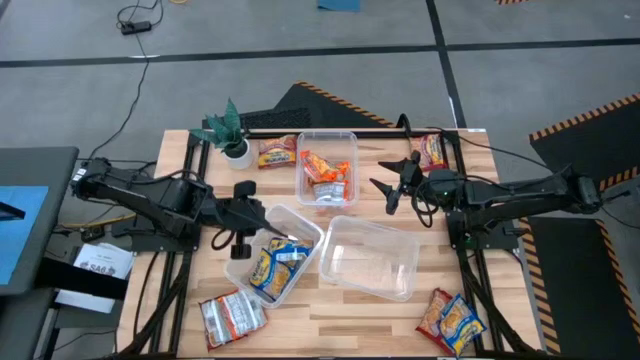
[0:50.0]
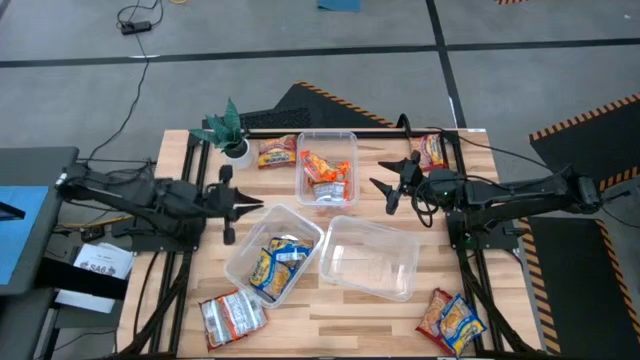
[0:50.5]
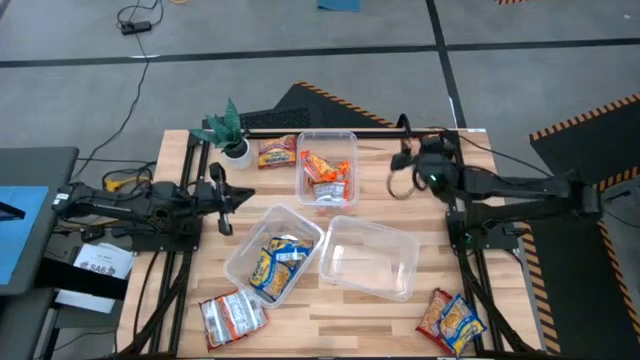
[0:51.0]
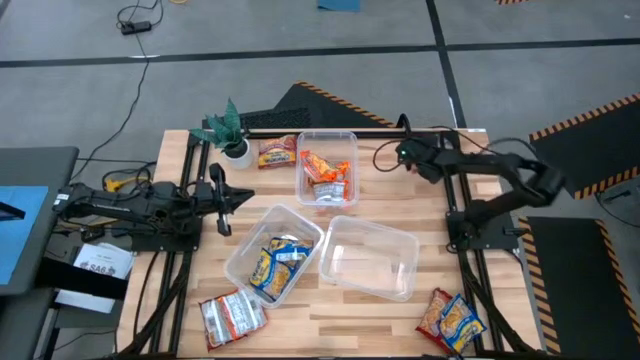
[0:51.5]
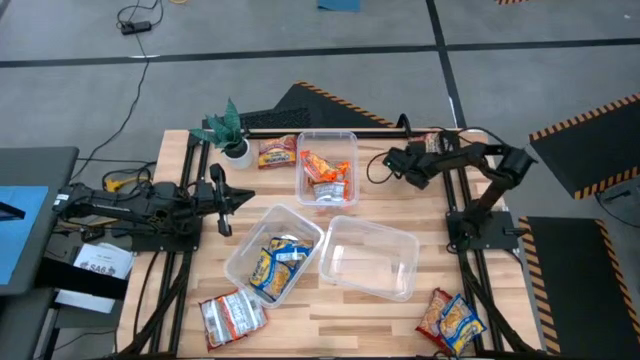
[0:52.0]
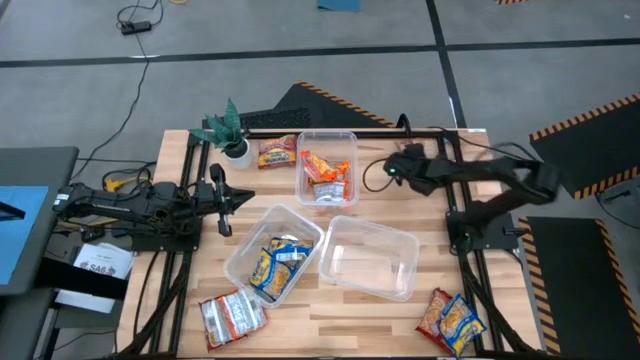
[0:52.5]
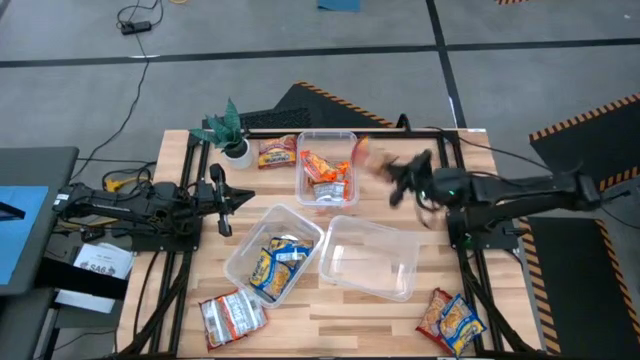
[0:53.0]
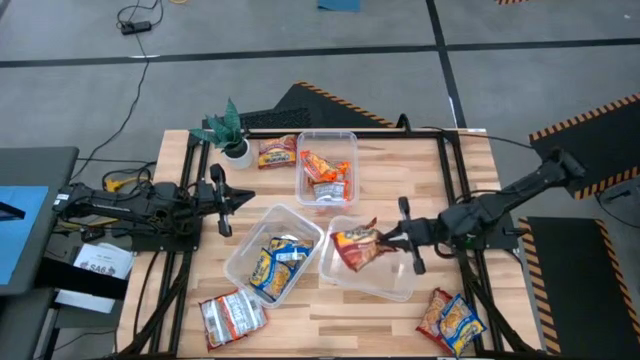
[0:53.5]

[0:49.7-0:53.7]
Task: Sort Maruchan noodles
Put the red noodle pack into the bottom right transparent bin

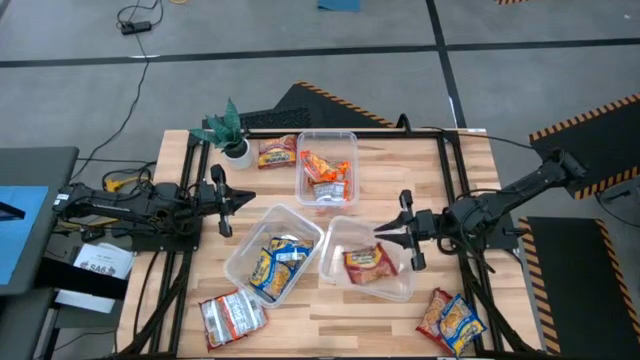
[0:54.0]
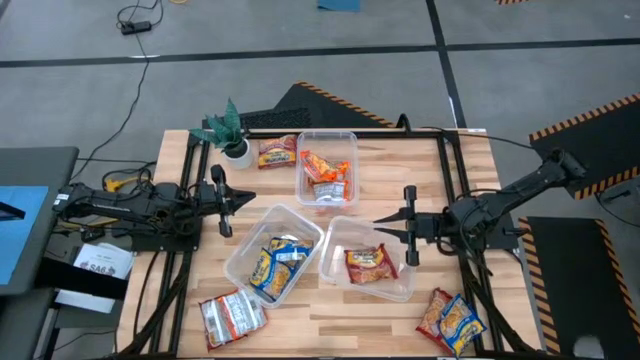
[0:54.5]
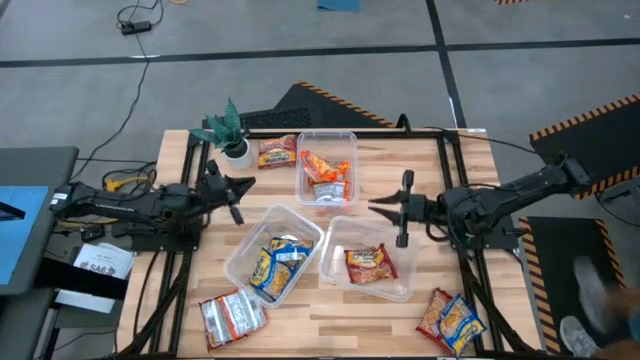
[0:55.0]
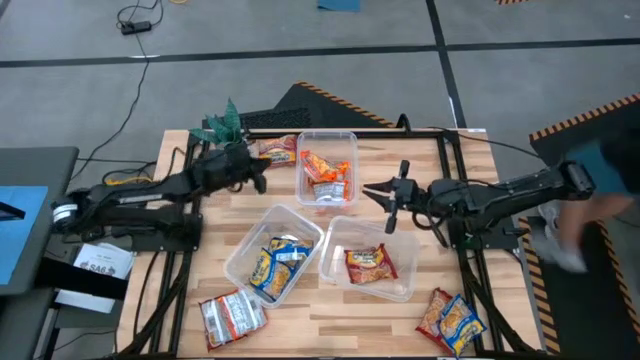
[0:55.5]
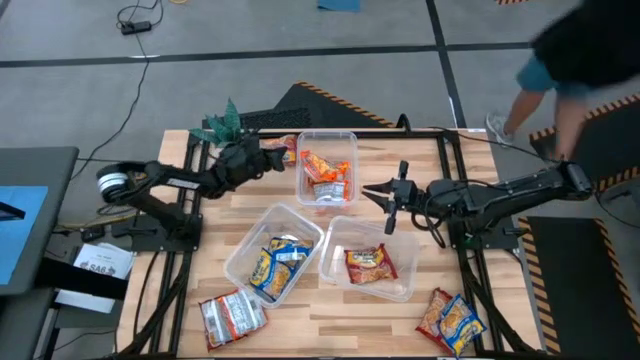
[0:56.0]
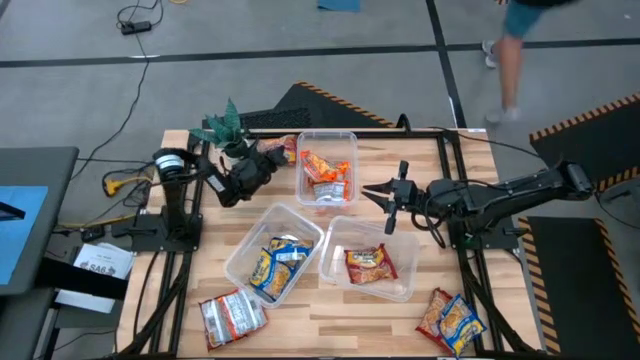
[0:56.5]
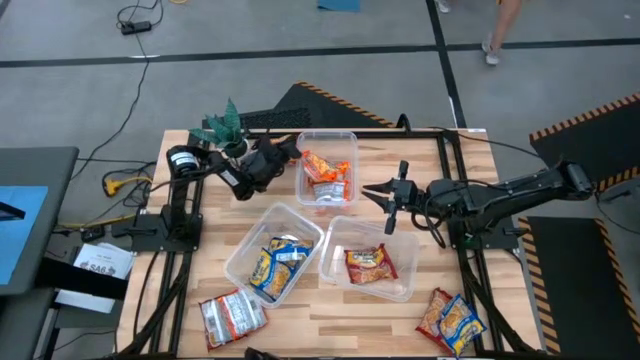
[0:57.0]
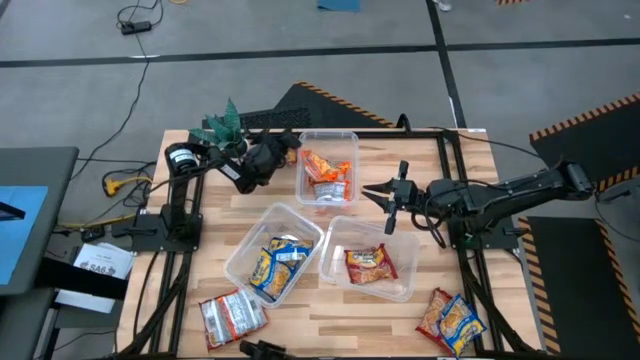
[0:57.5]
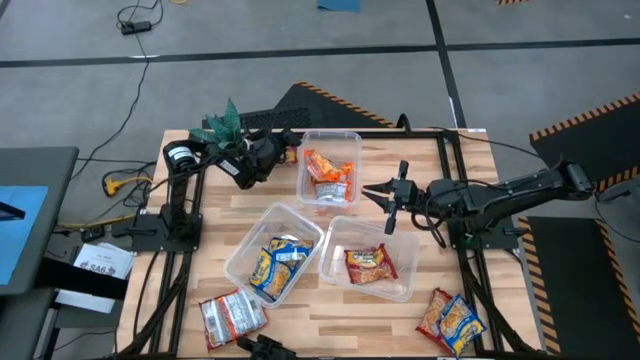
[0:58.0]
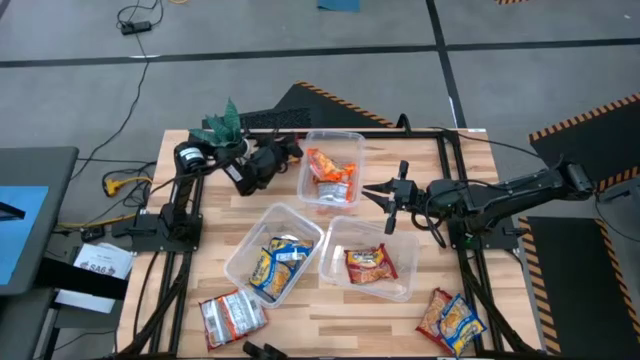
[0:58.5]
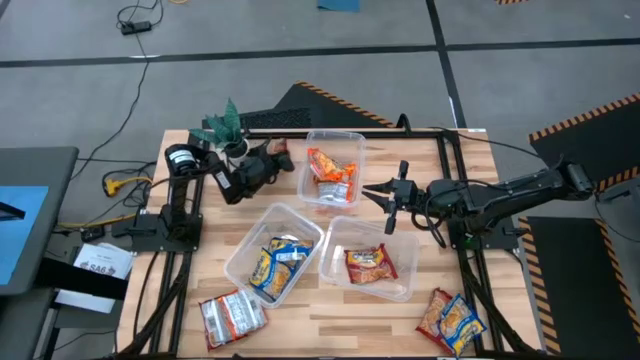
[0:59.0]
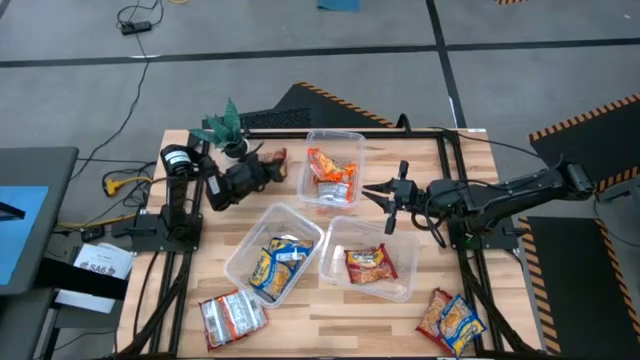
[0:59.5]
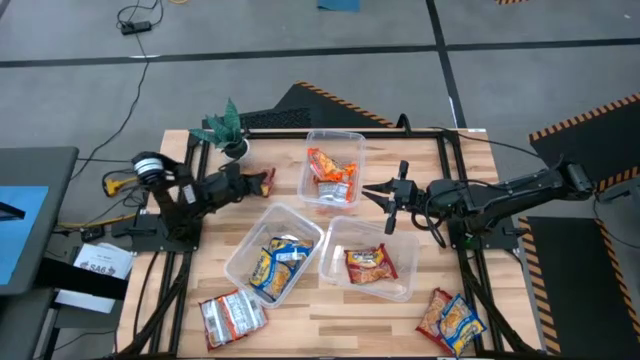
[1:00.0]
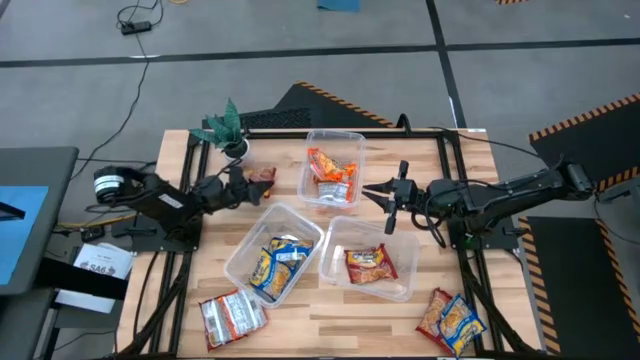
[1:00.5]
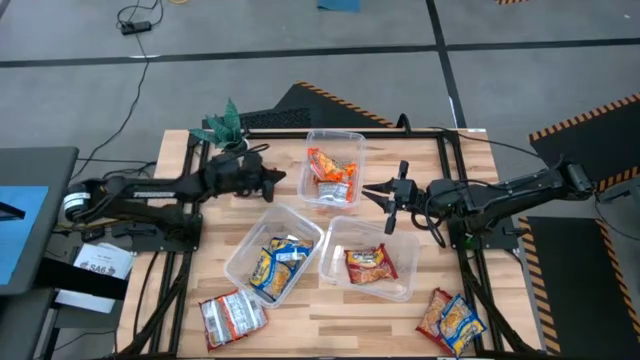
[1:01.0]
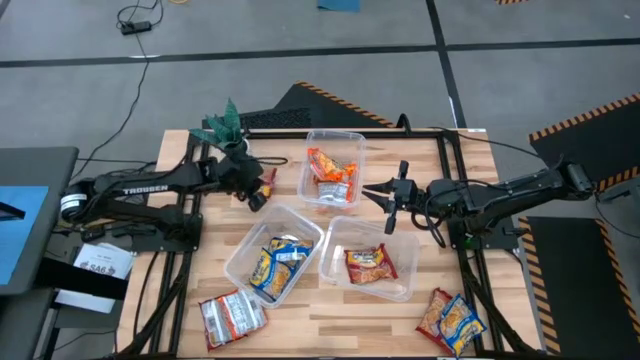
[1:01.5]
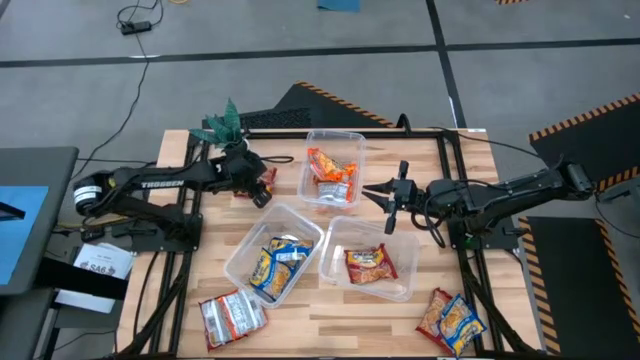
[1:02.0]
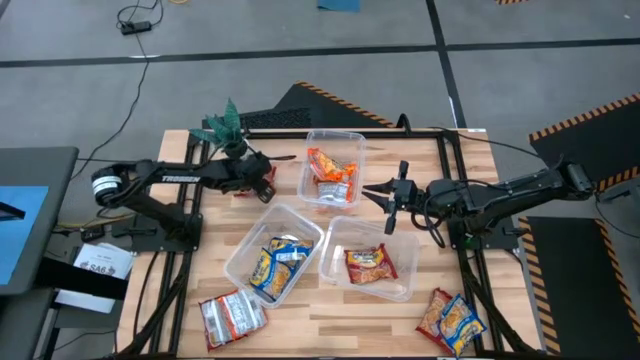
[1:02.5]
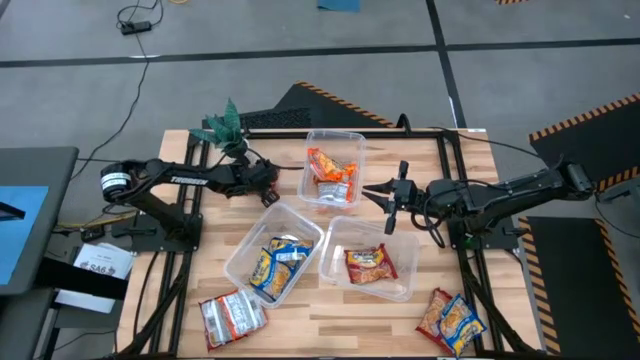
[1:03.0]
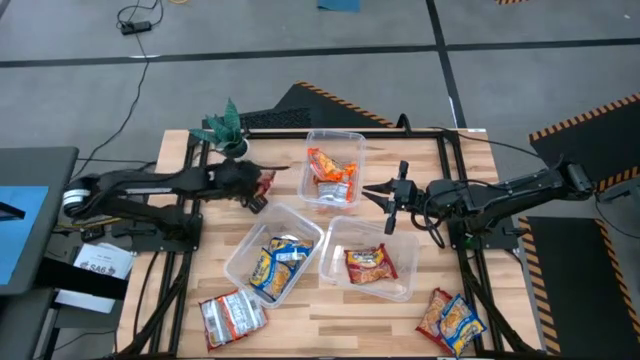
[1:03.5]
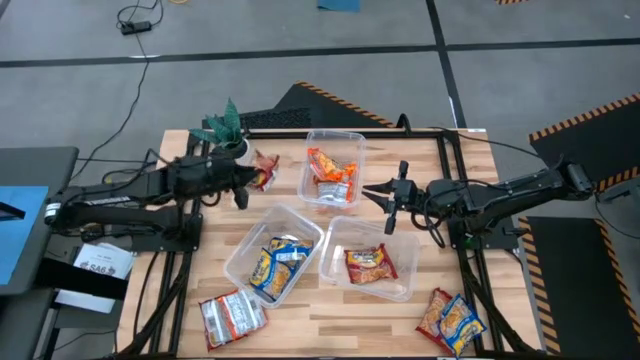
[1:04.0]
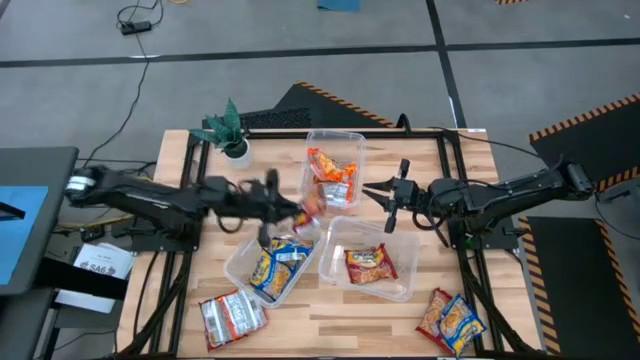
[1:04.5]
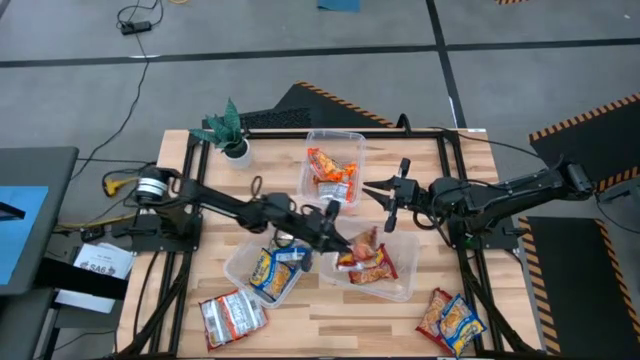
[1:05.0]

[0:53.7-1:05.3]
Put the red noodle pack into the bottom right transparent bin

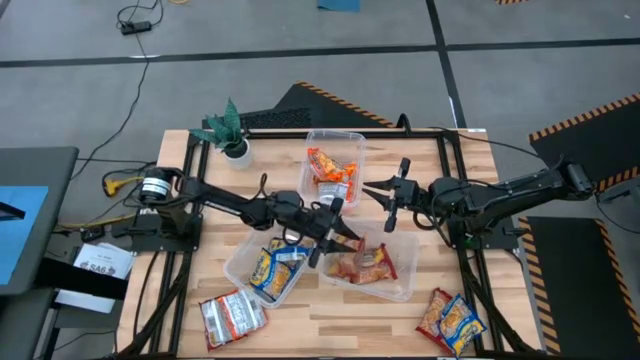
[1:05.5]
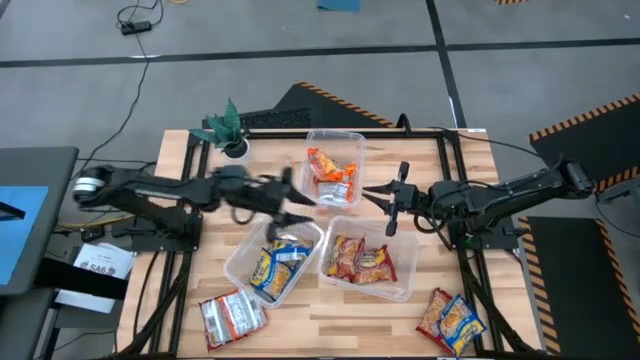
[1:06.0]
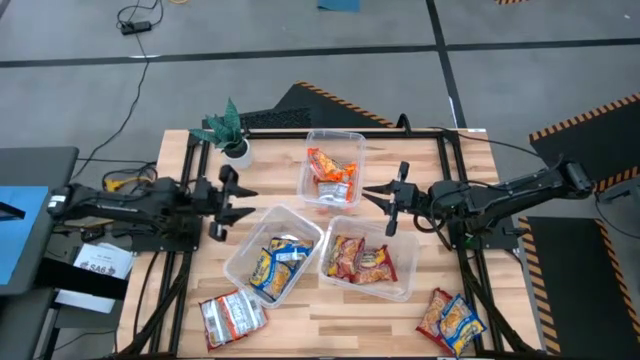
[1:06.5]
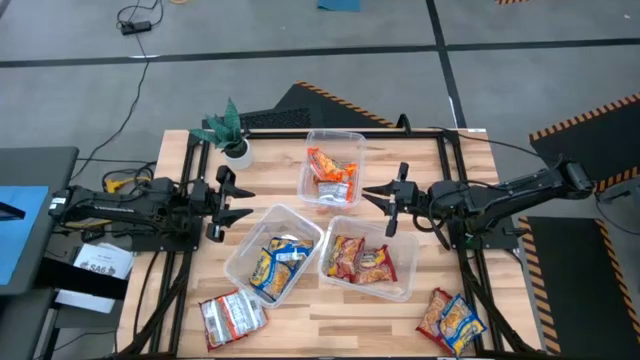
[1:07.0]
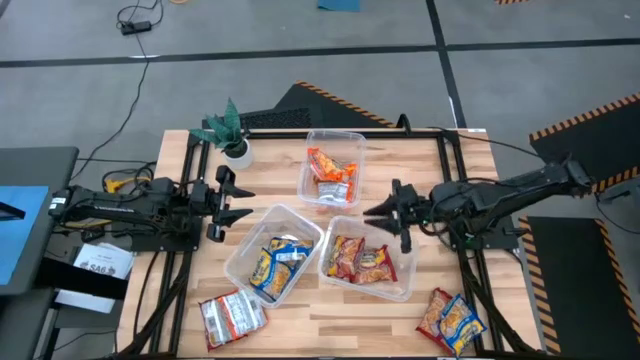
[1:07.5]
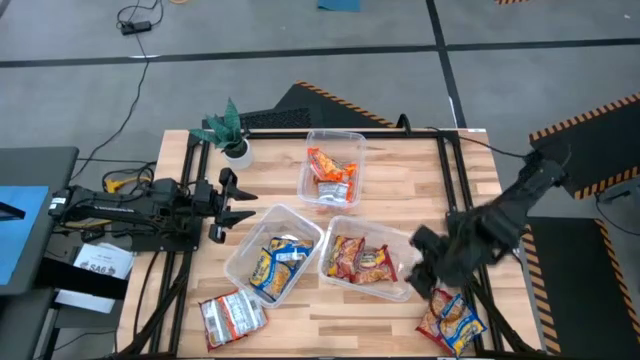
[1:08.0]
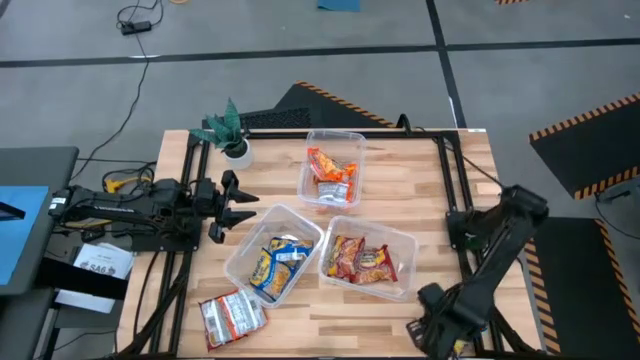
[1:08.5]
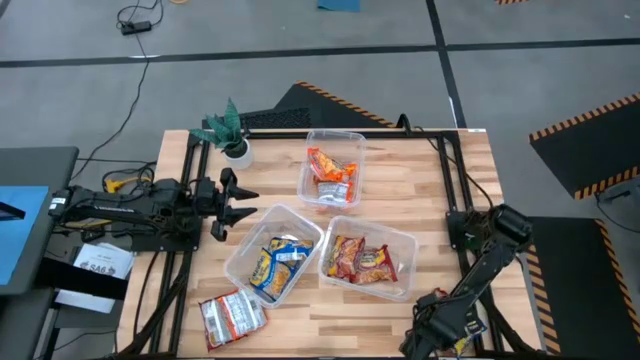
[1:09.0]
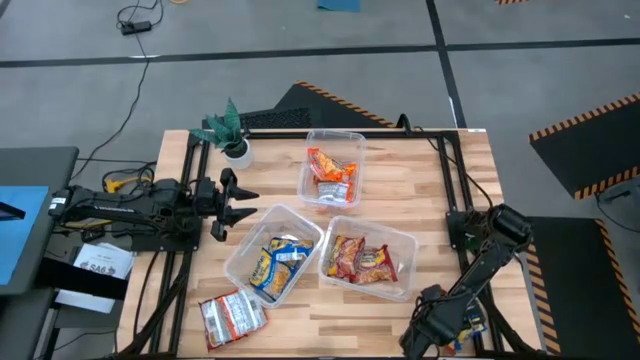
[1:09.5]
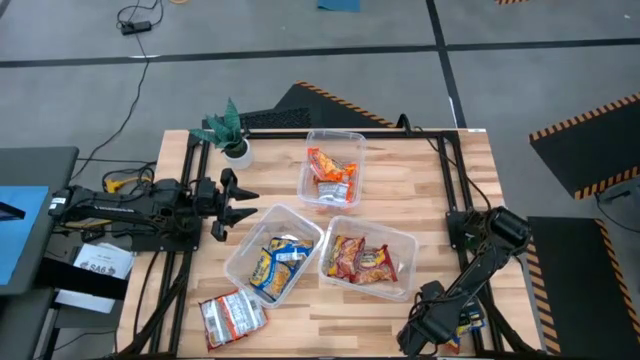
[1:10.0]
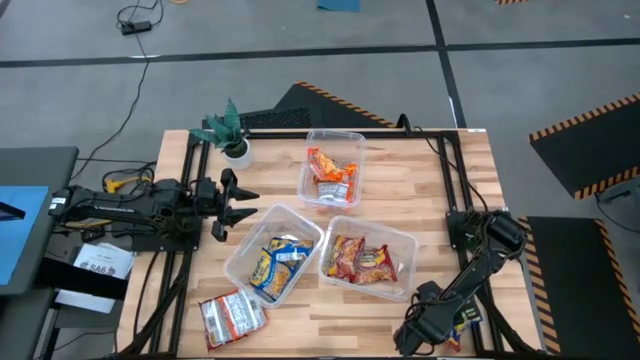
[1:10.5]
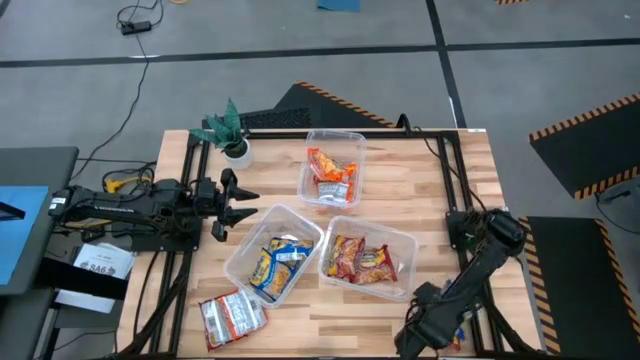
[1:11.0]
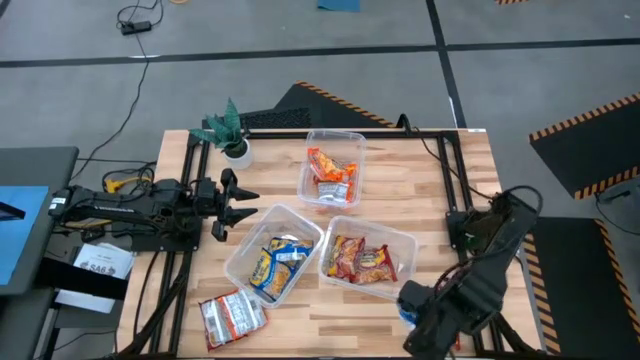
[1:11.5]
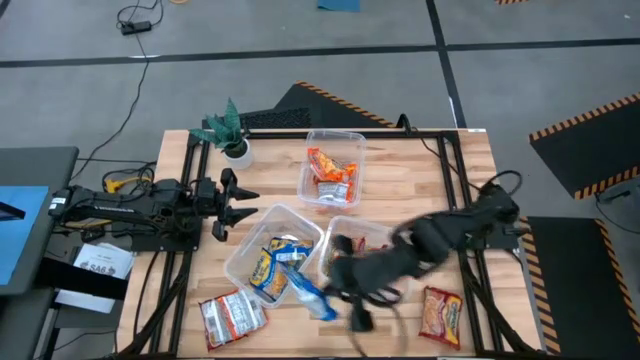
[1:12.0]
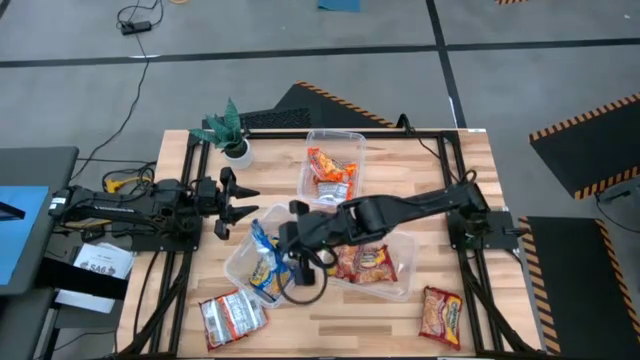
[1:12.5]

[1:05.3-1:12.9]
Put the blue noodle pack into the bottom left transparent bin
